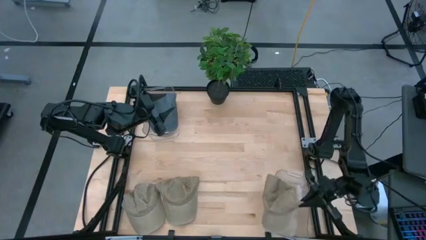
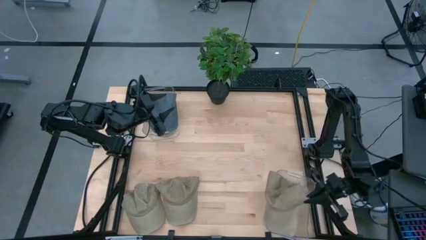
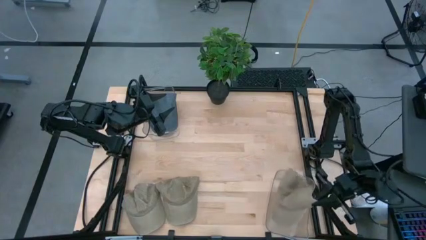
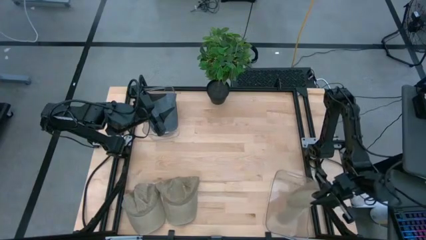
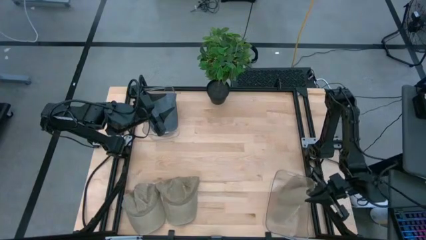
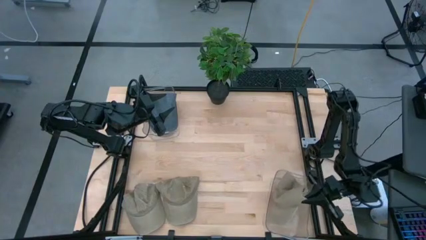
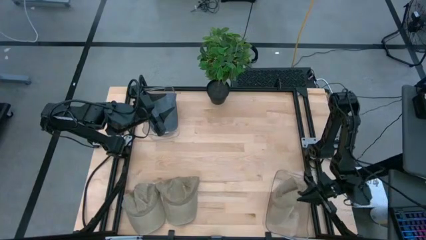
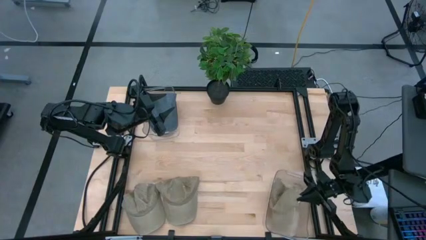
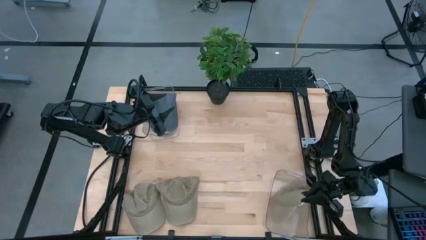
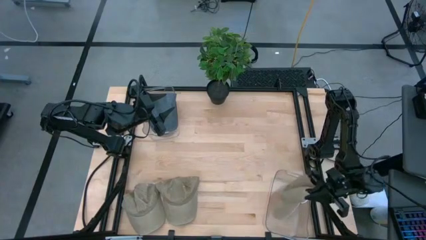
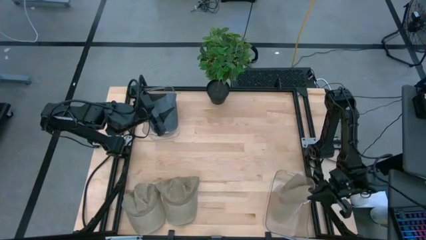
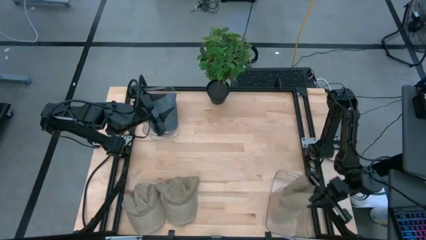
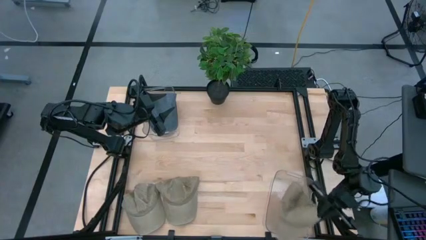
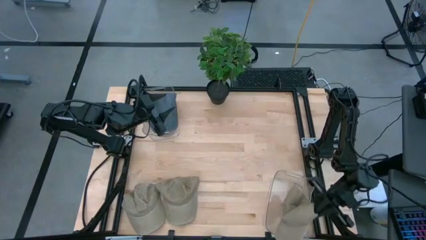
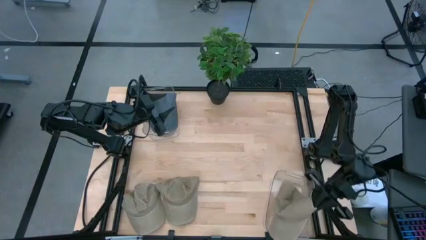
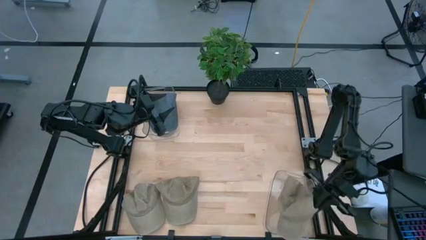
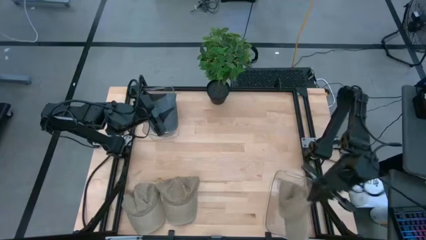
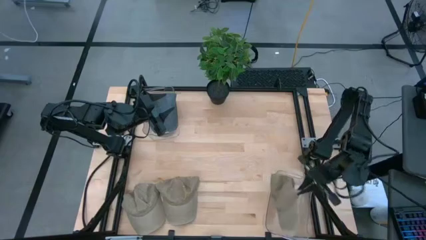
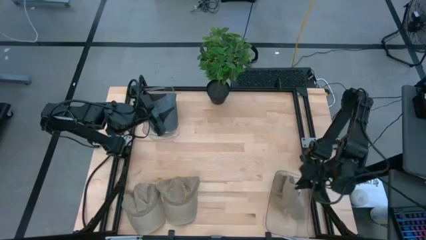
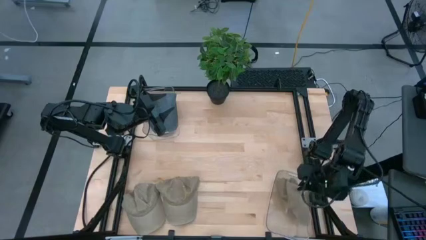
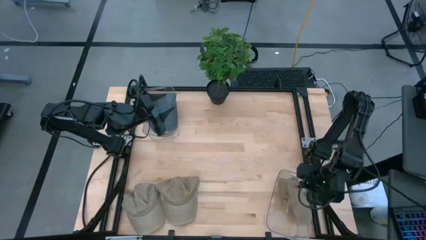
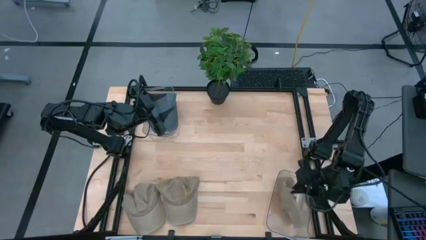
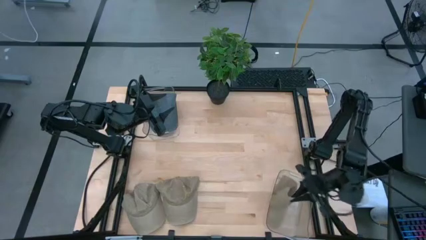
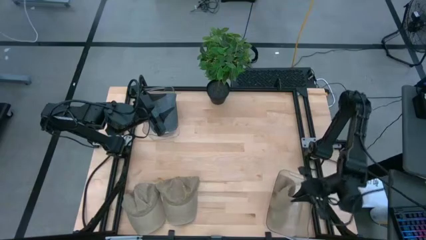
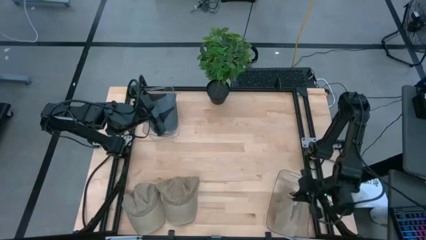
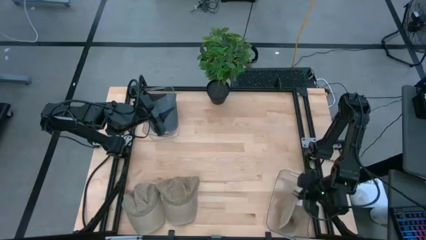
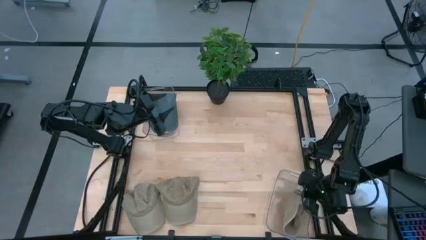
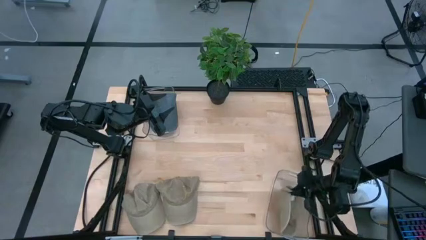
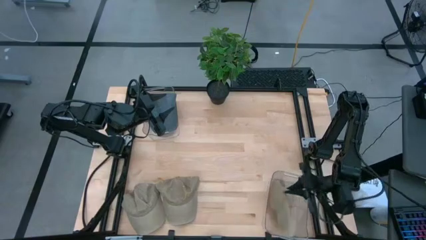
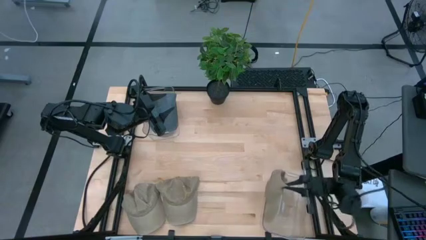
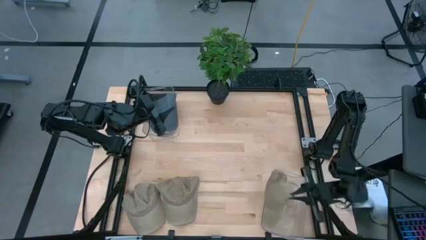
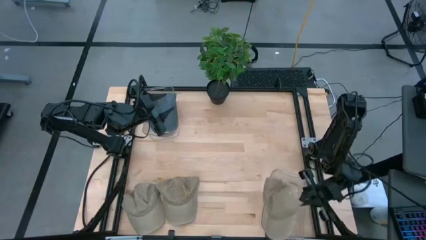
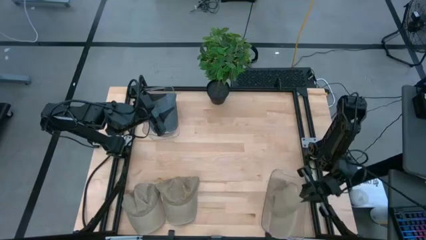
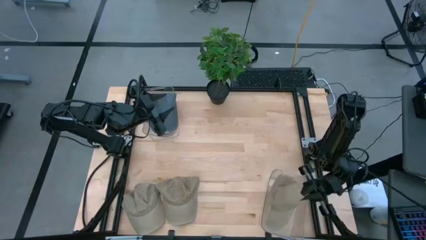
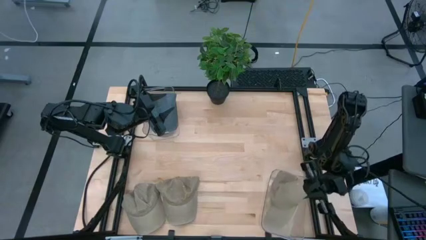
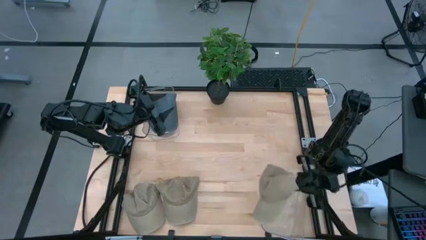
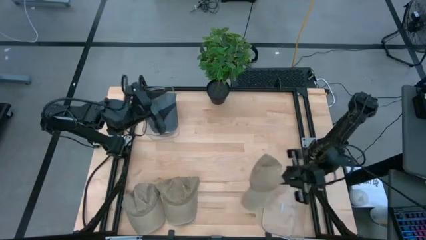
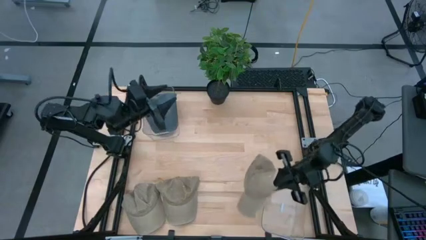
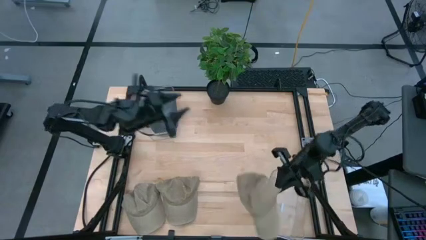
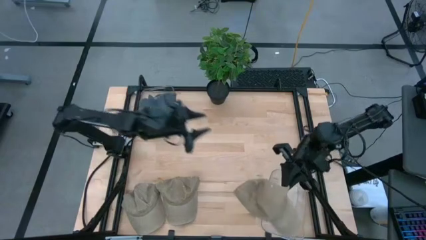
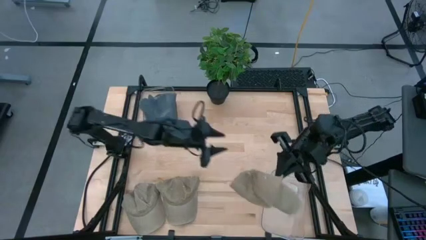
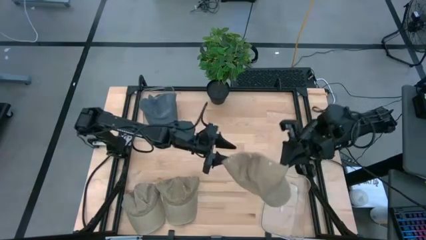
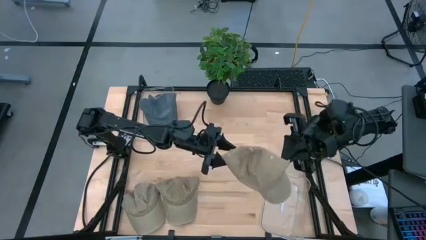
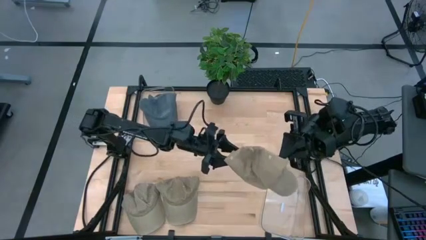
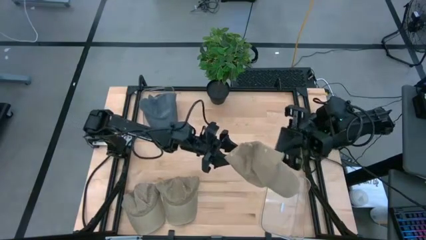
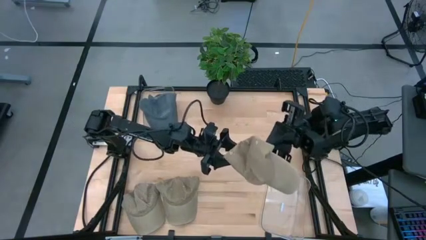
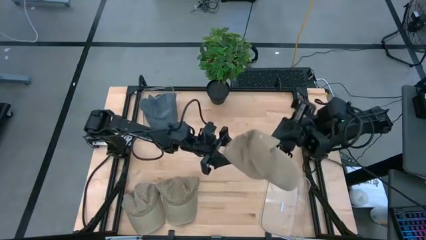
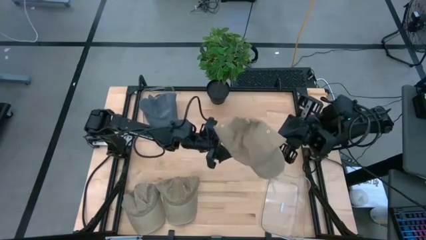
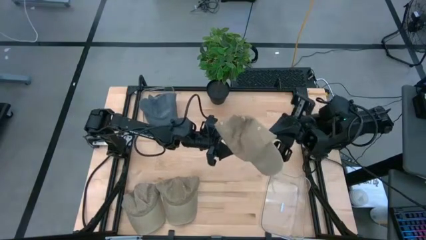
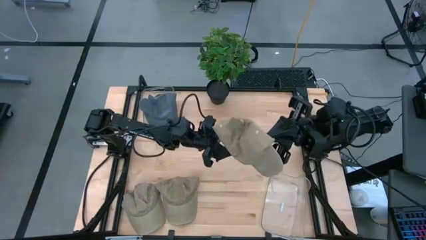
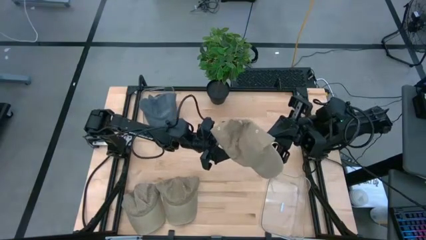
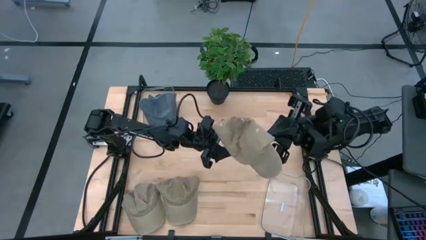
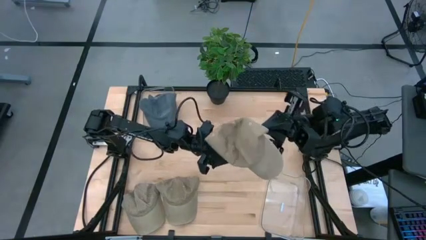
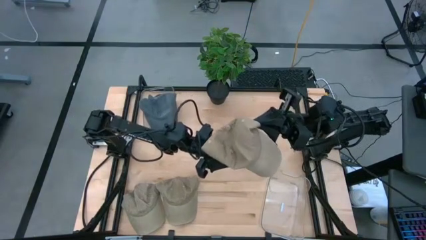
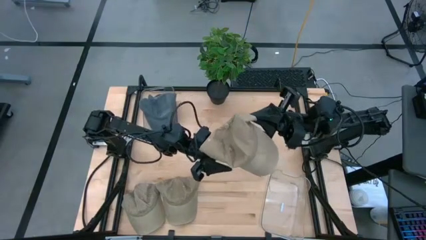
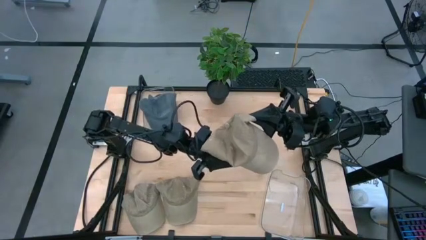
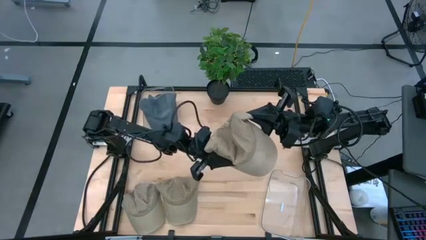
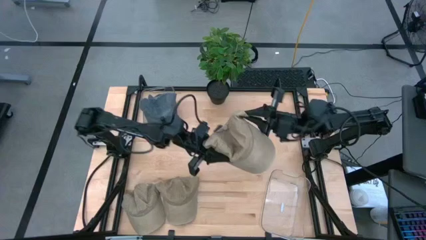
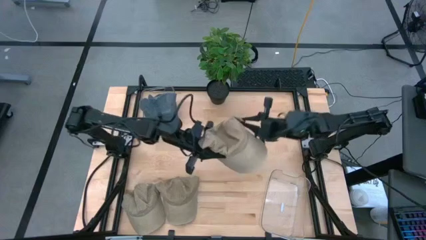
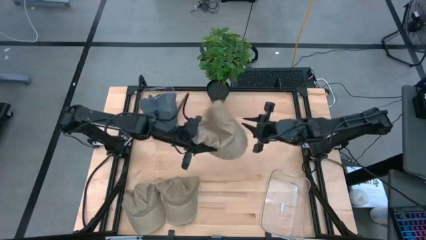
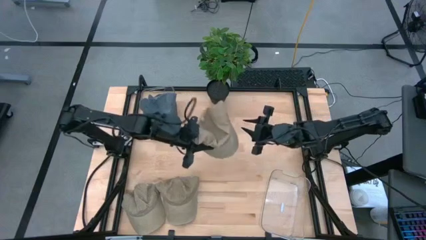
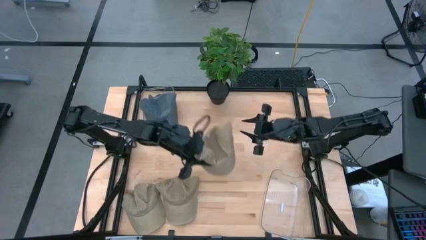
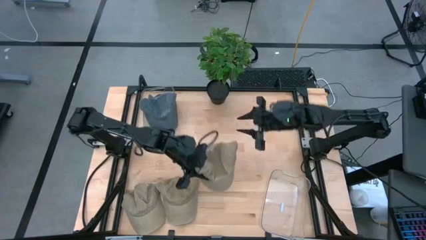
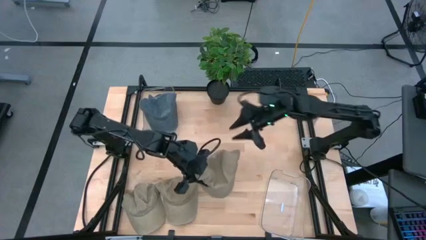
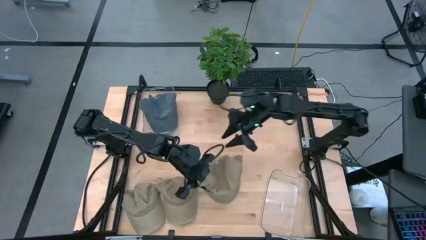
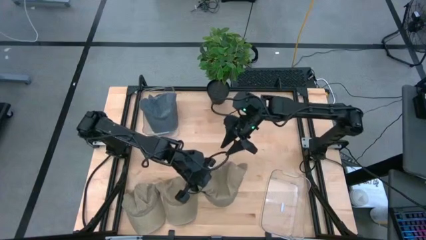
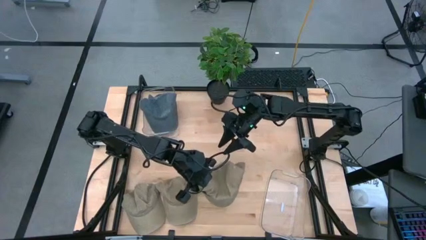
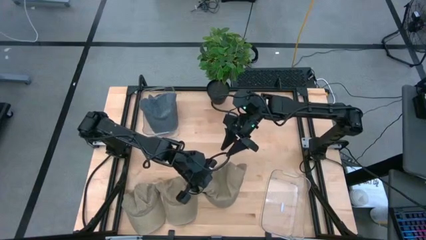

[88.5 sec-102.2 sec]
Task: Pick & Place hat
Put the top left brown cap into the right transparent bin

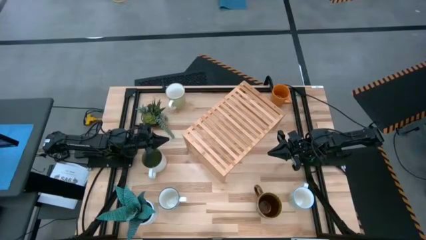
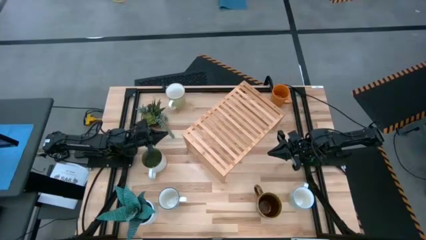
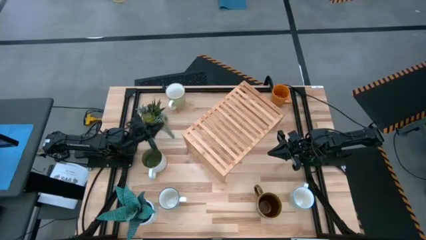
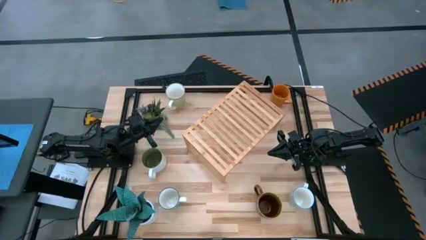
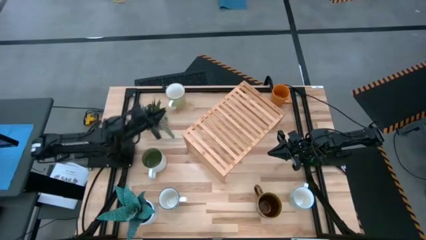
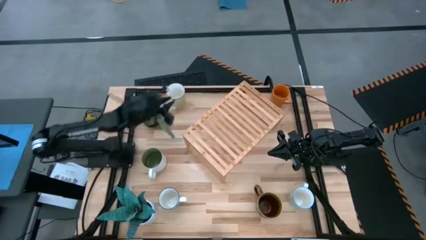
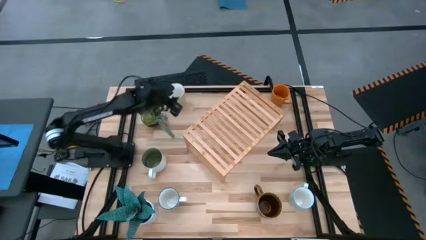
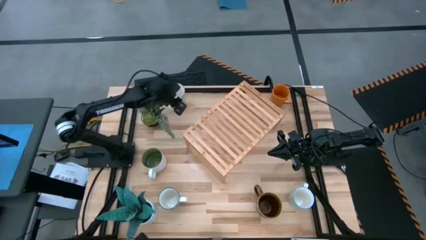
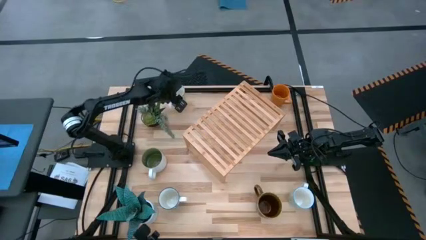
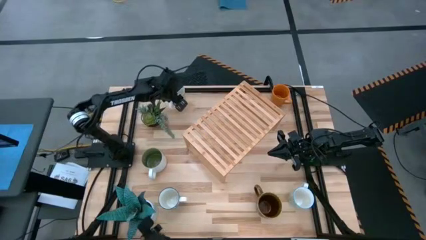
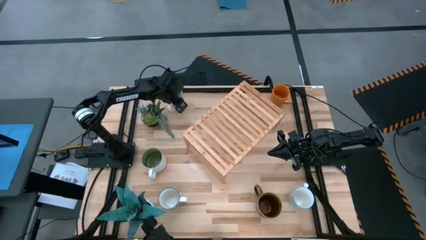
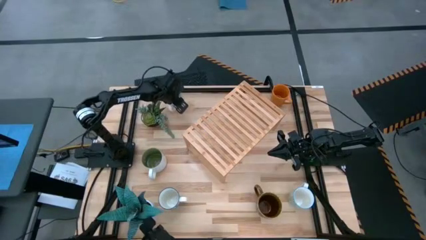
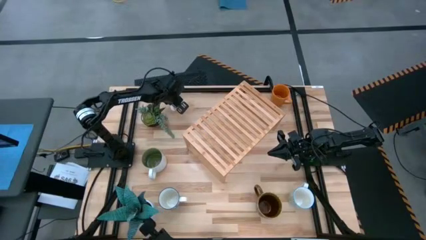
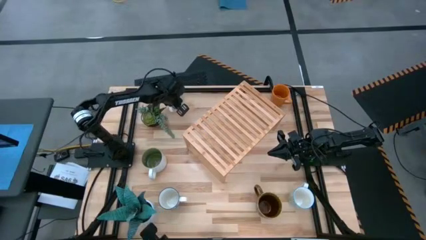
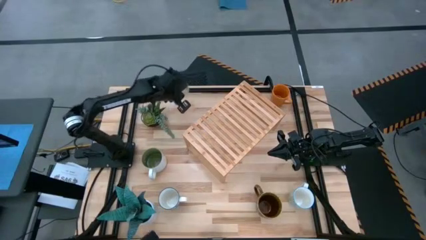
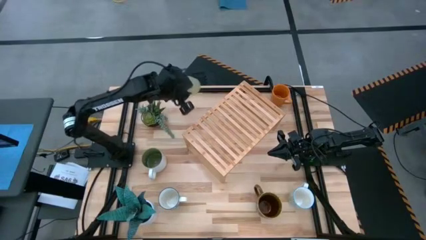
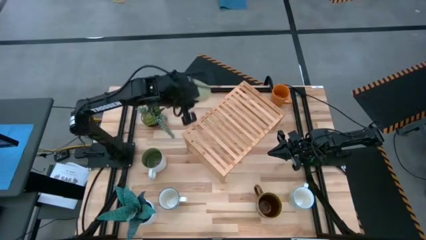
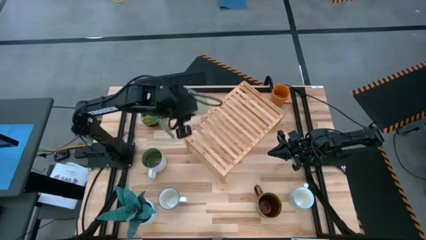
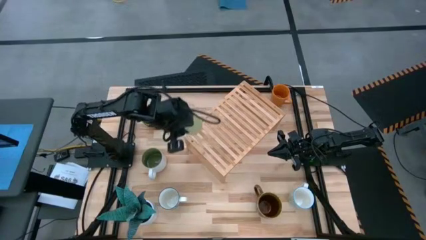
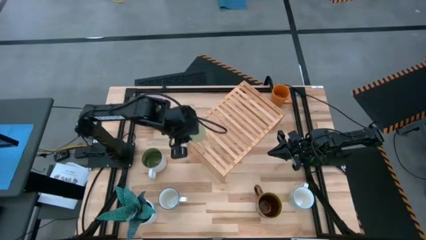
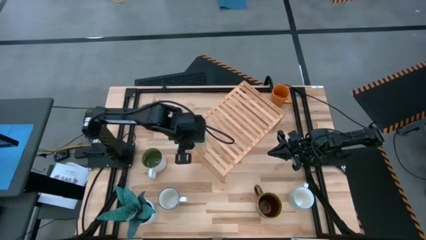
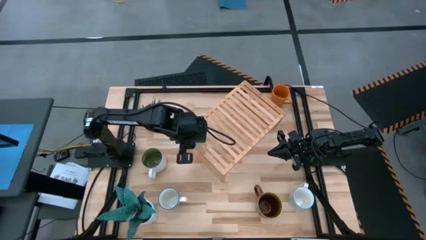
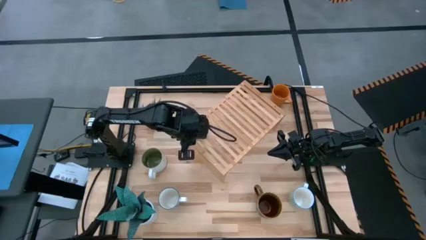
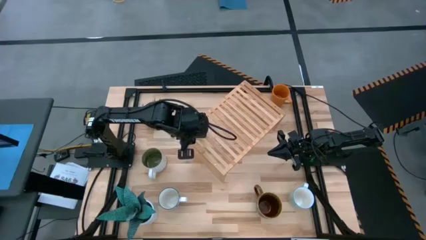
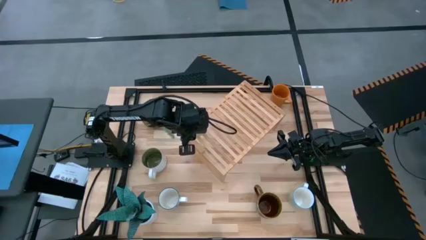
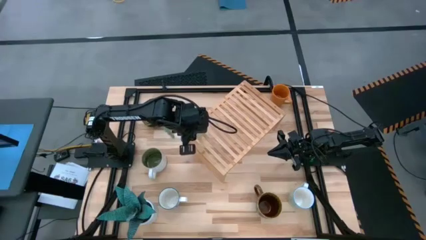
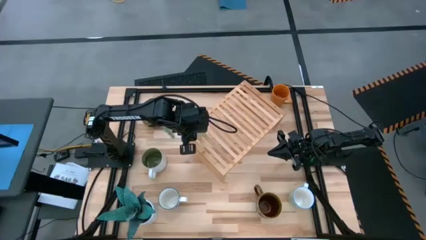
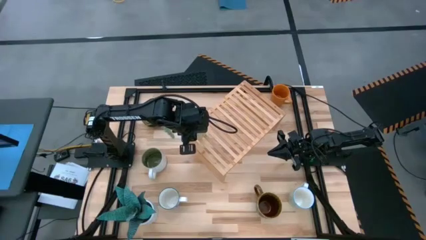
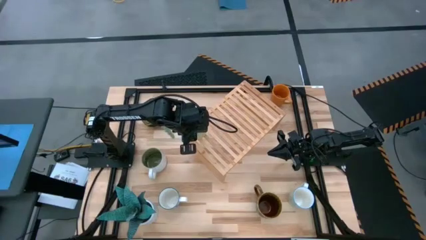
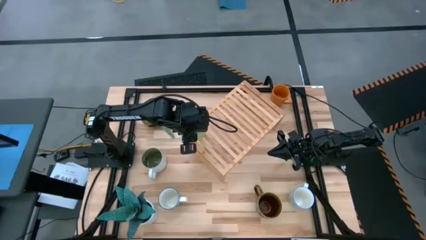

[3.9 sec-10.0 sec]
Task: Place coffee mugs
Put the light green mug on the shelf
